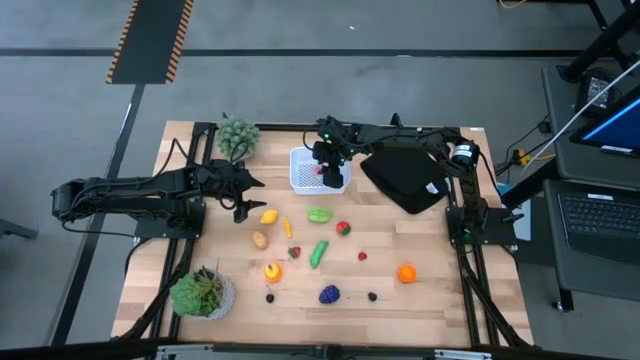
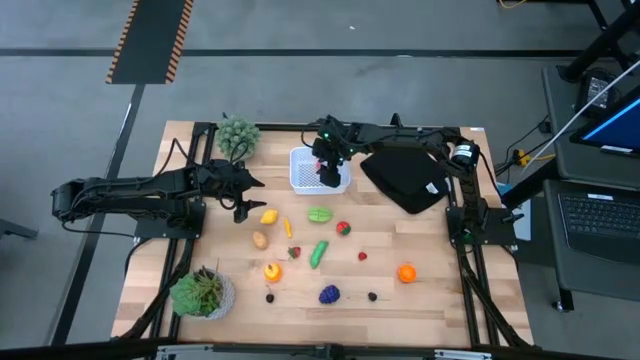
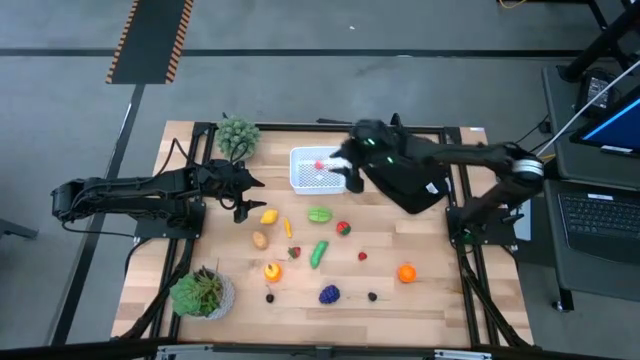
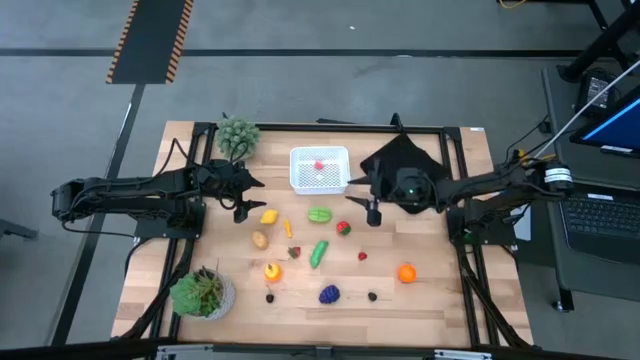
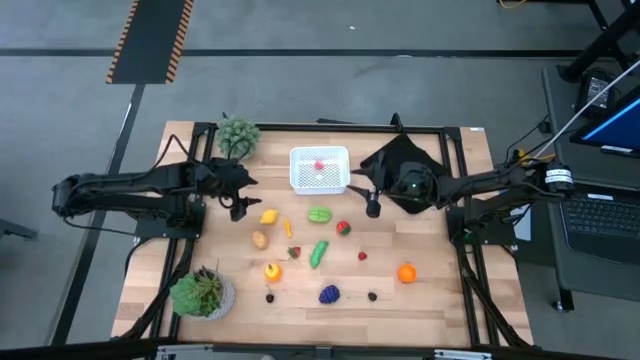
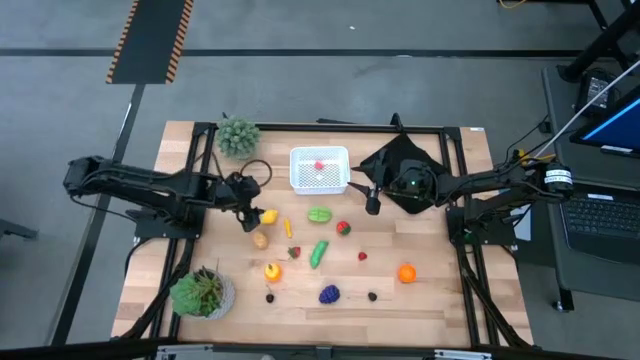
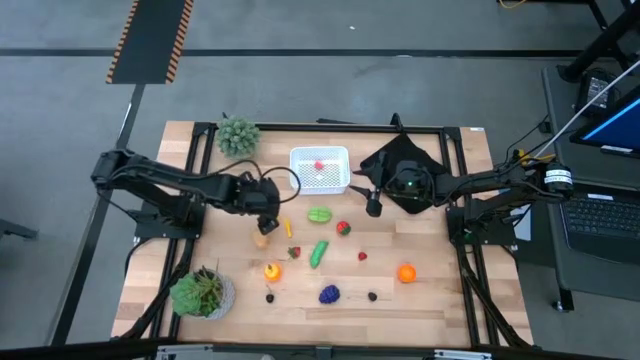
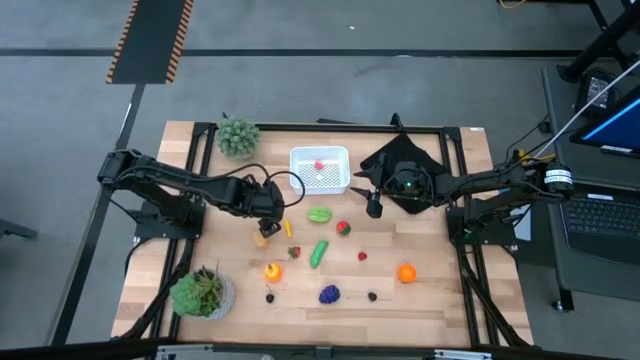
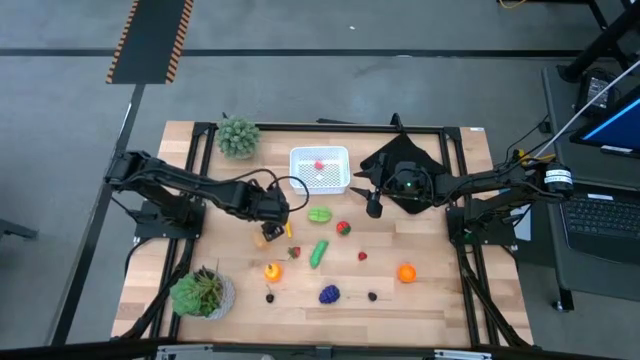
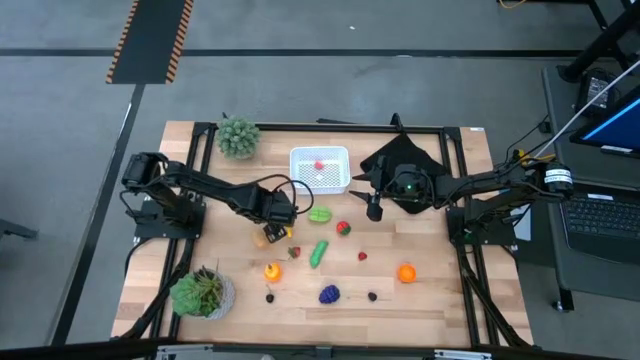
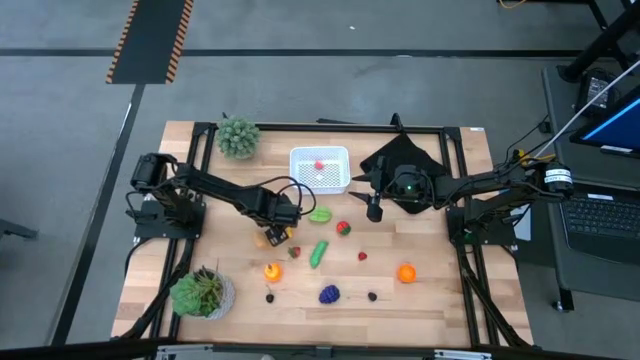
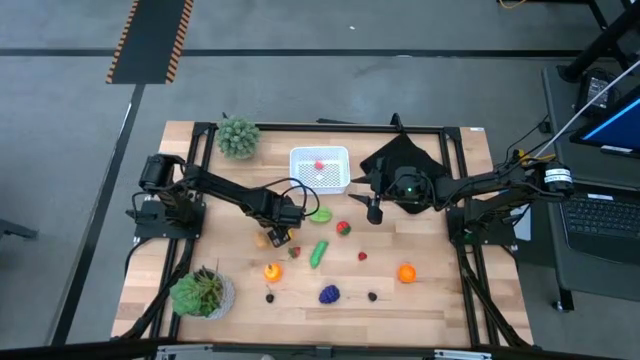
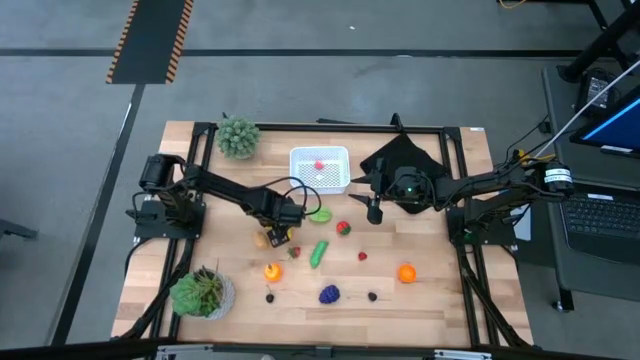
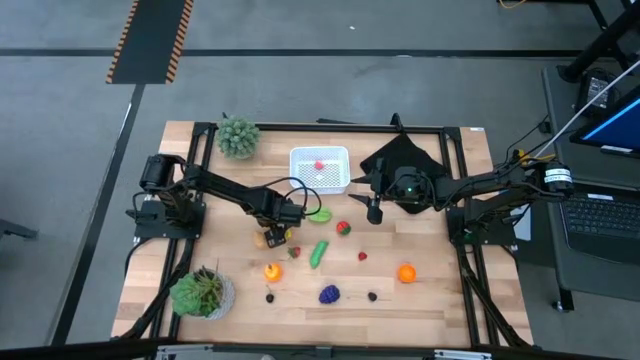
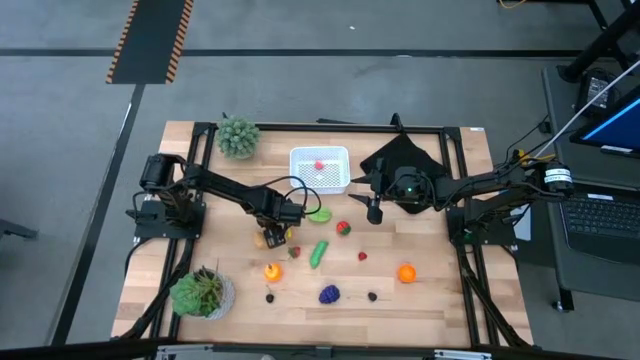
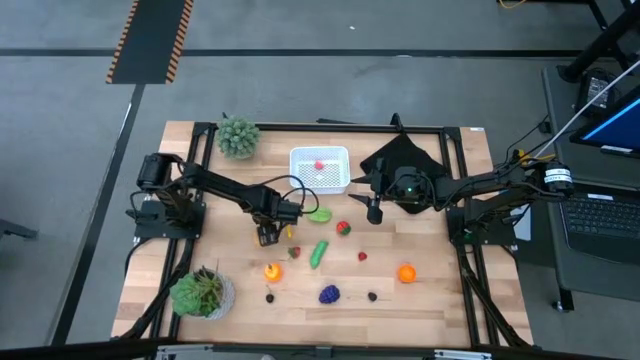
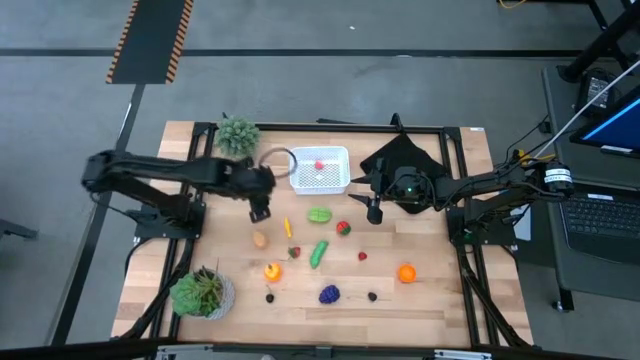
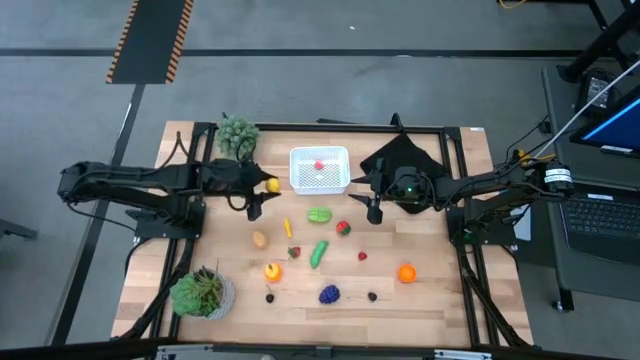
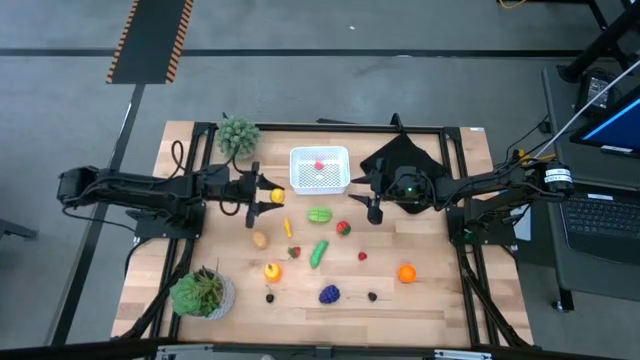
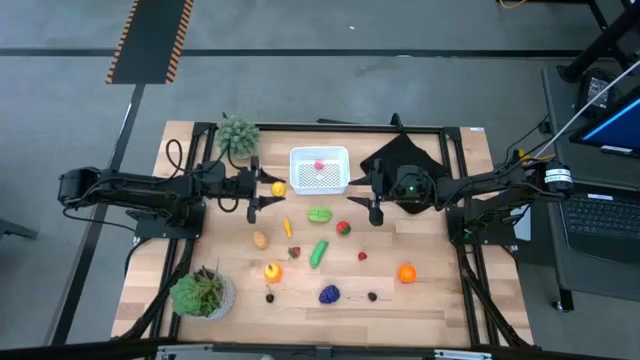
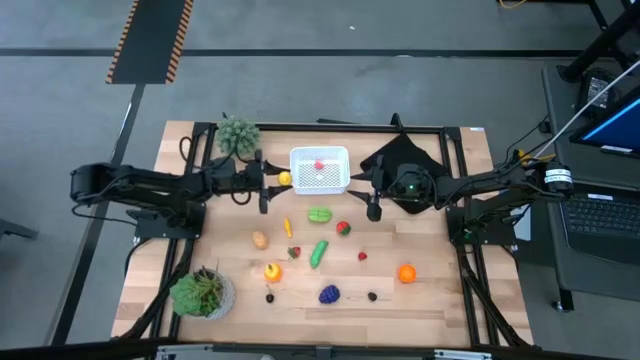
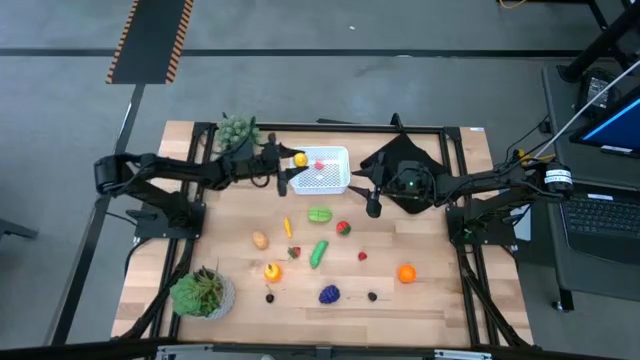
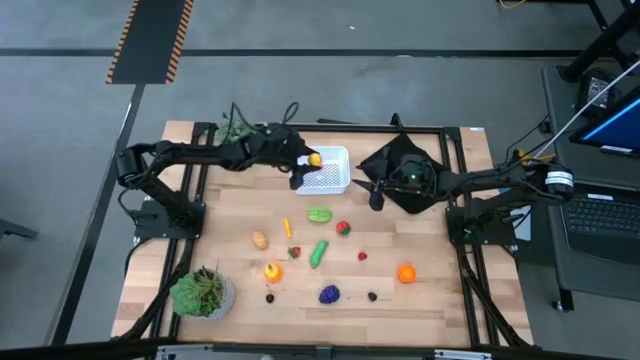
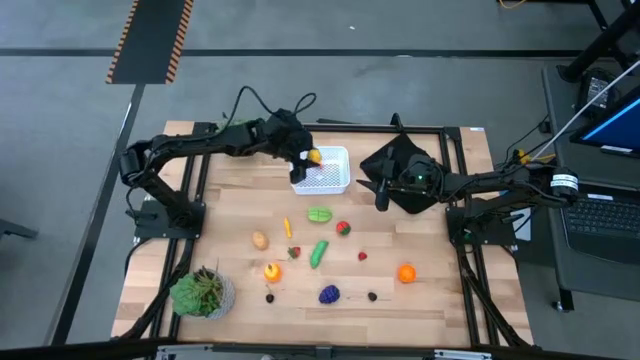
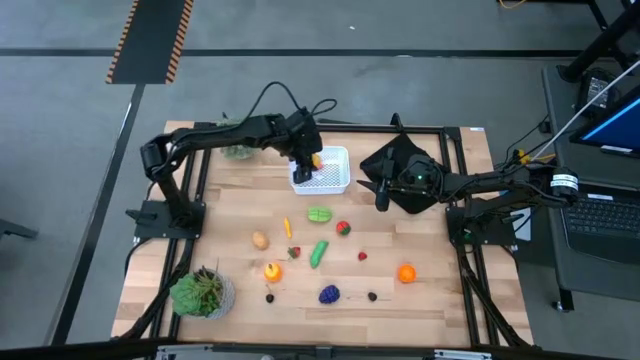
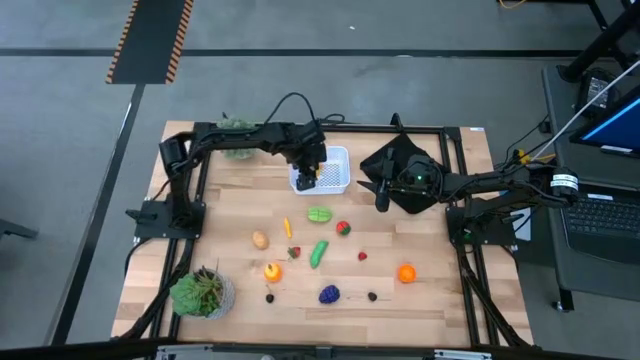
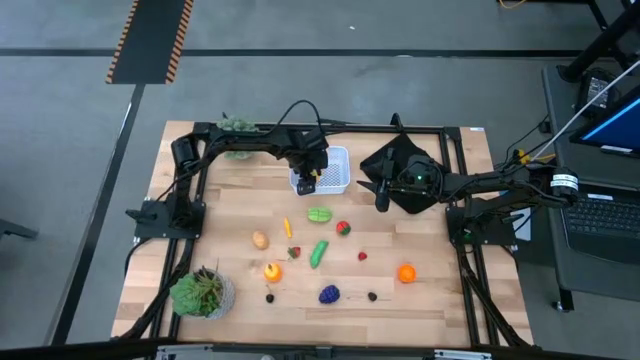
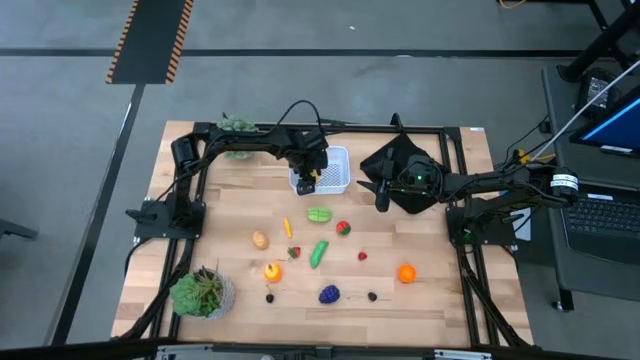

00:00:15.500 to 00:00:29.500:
Task: Pick and placing Produce into tupperware
Put the lemon into the white bin

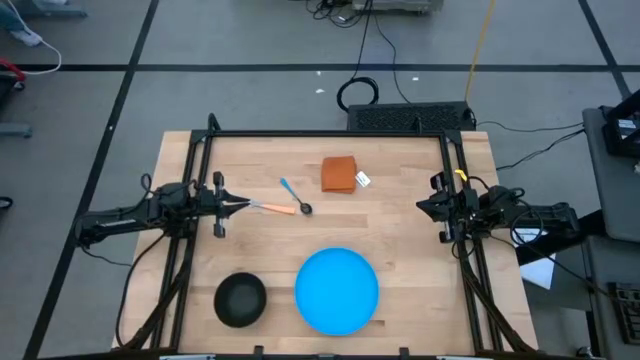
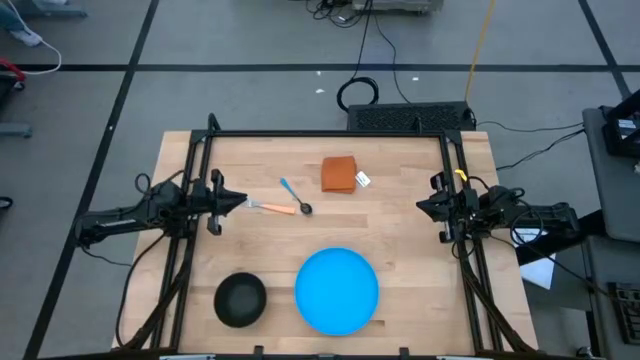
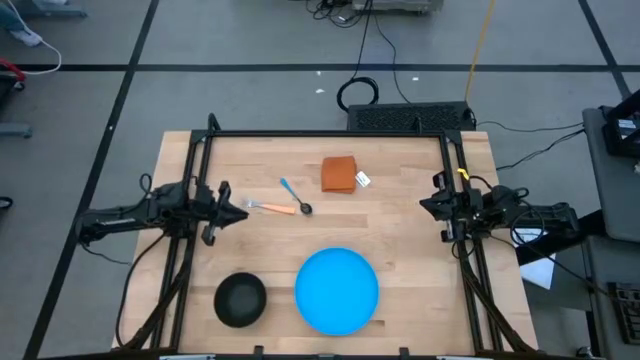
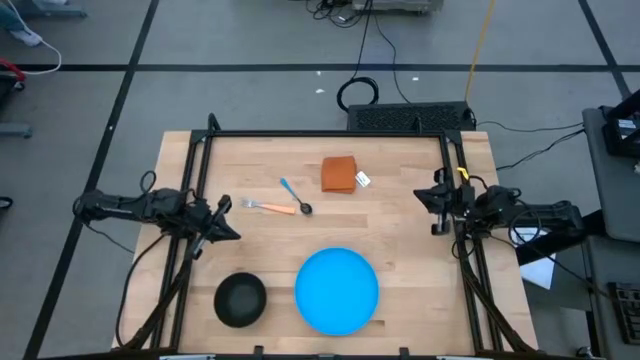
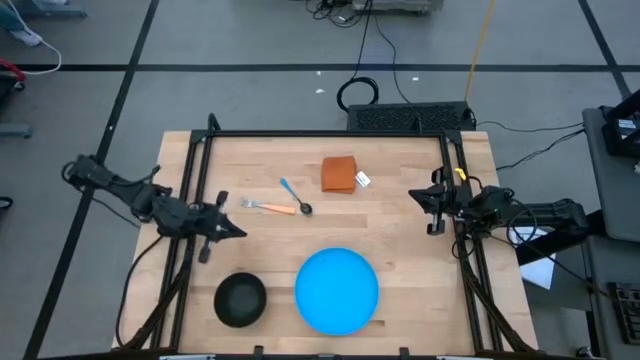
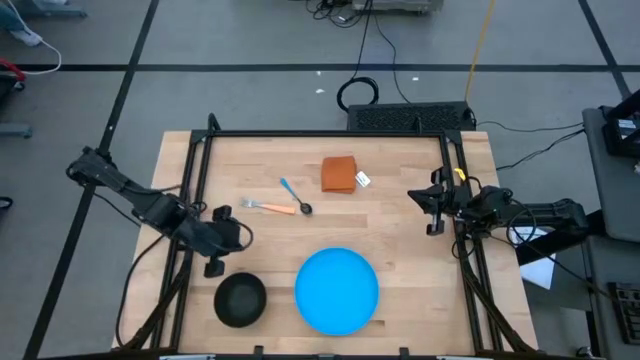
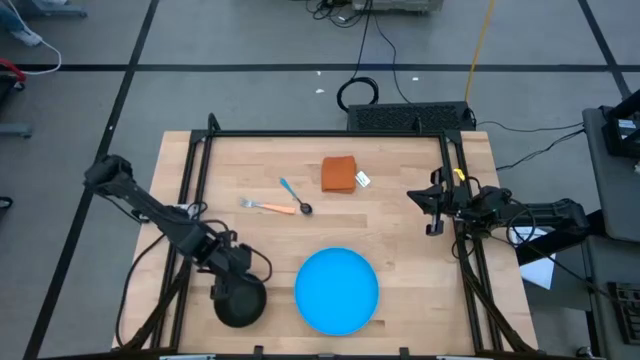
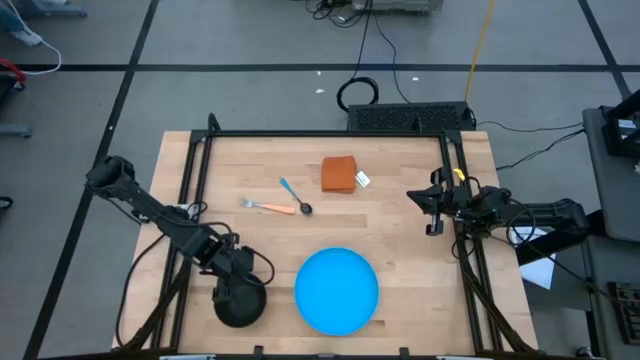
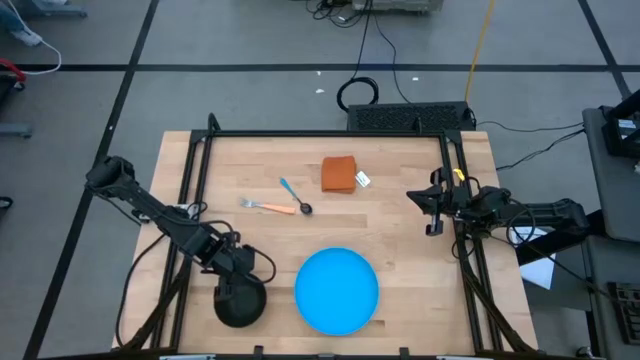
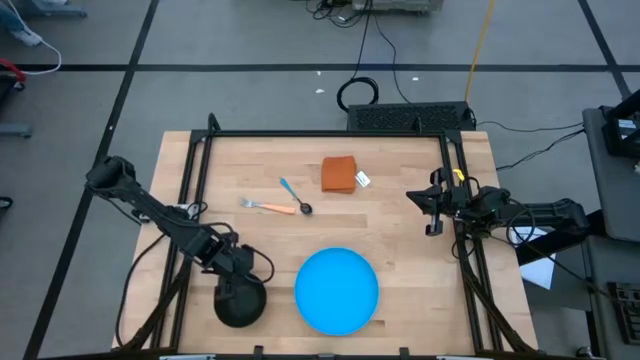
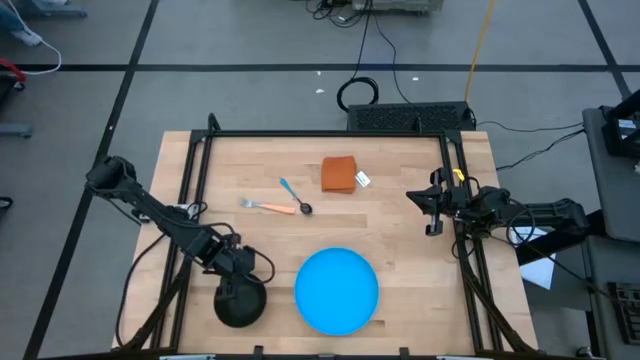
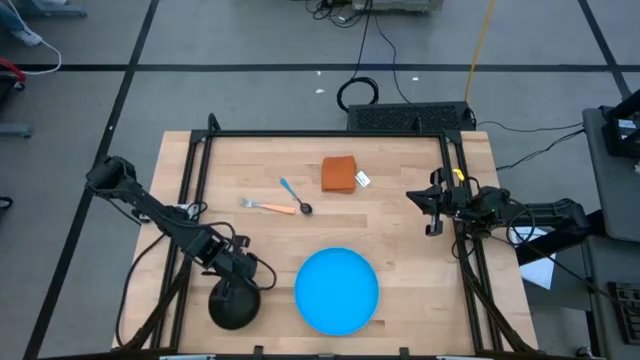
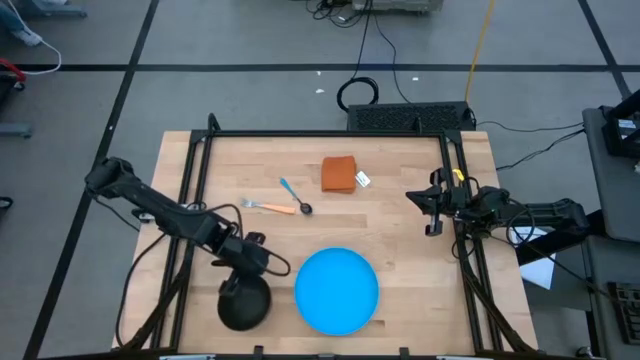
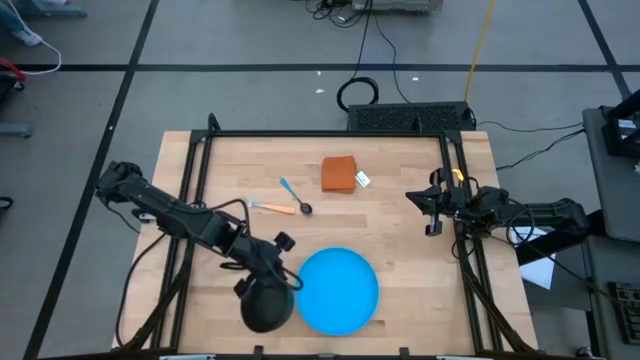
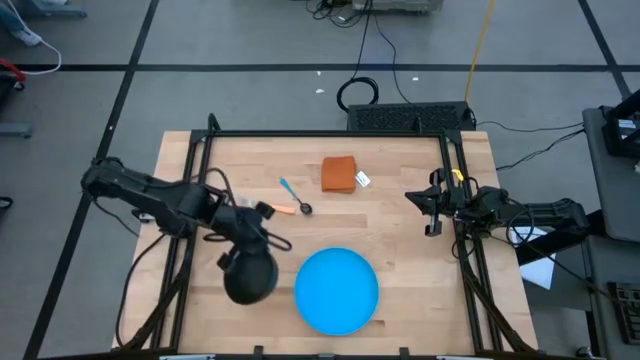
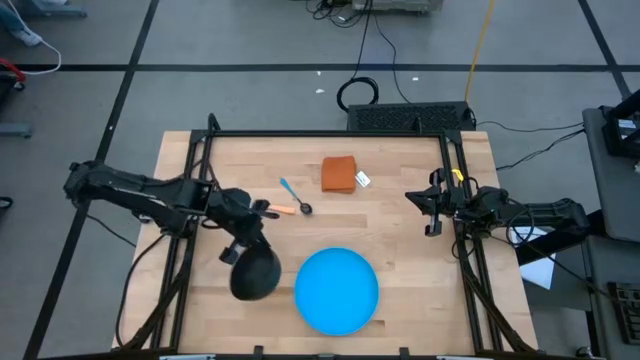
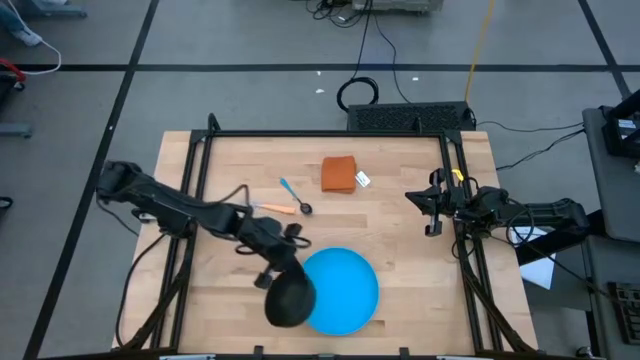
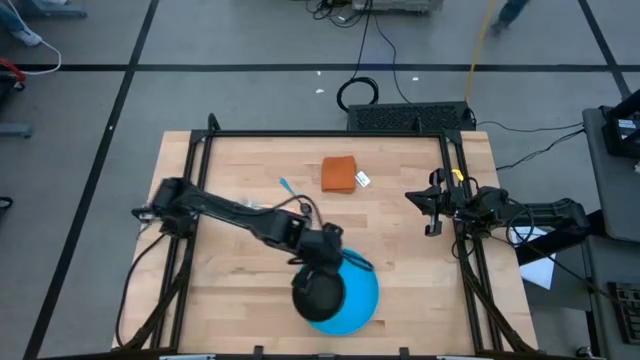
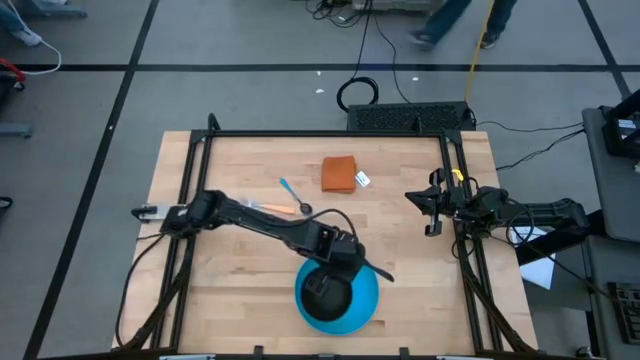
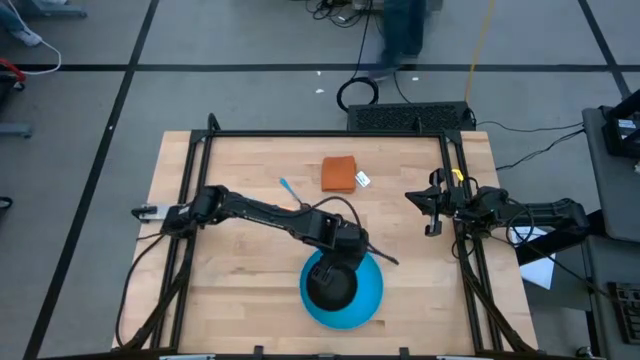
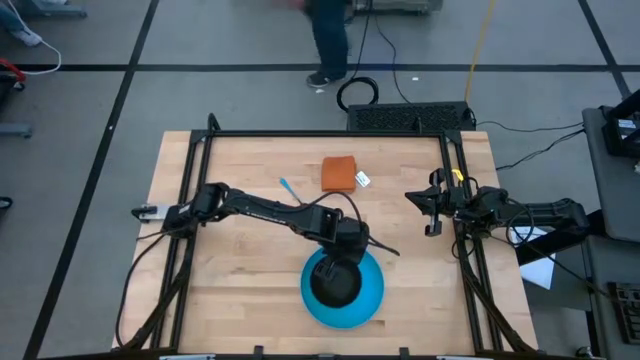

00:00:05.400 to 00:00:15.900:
Task: Set table place
Put the black bowl on top of the blue plate
